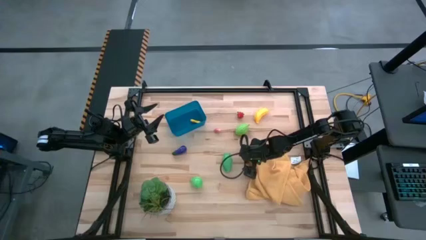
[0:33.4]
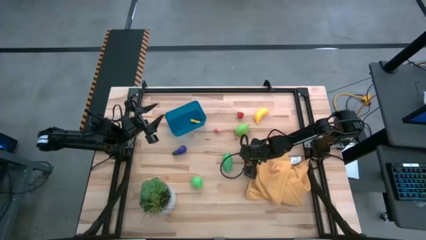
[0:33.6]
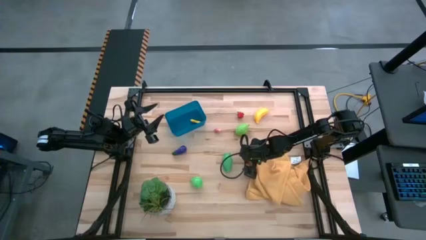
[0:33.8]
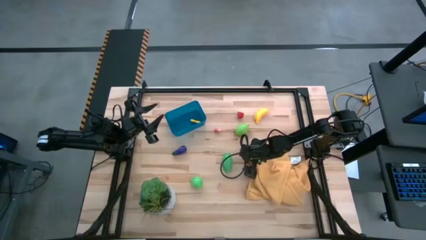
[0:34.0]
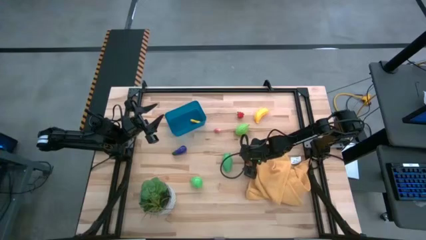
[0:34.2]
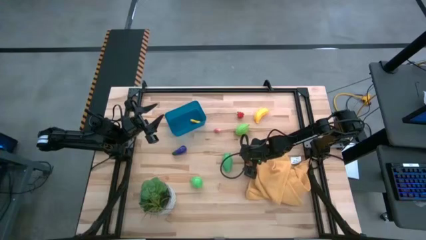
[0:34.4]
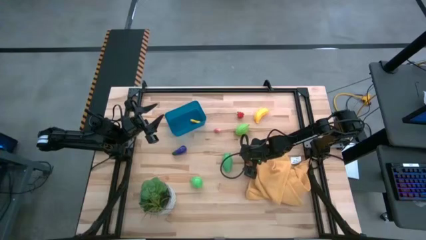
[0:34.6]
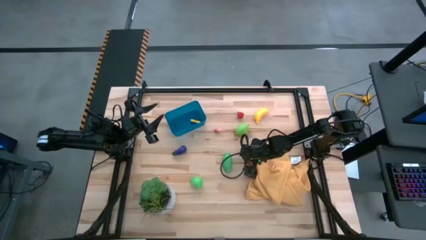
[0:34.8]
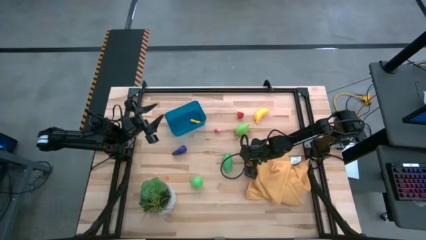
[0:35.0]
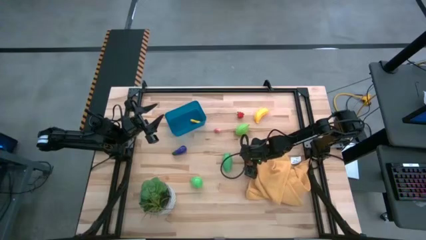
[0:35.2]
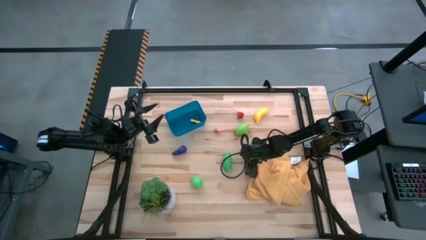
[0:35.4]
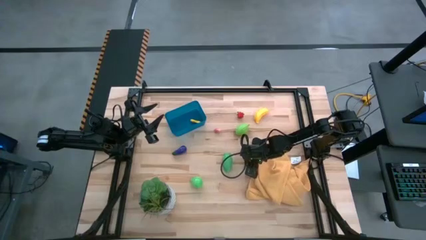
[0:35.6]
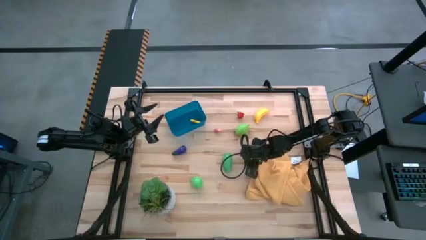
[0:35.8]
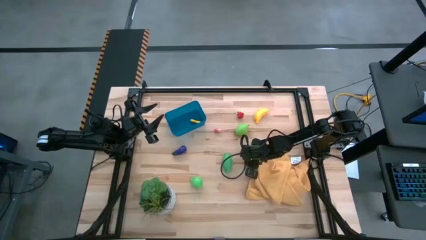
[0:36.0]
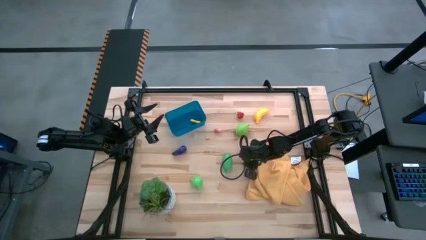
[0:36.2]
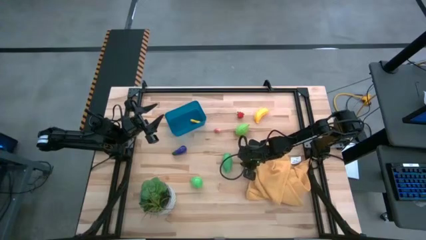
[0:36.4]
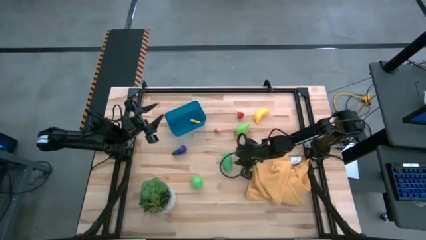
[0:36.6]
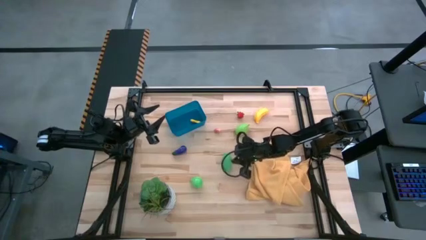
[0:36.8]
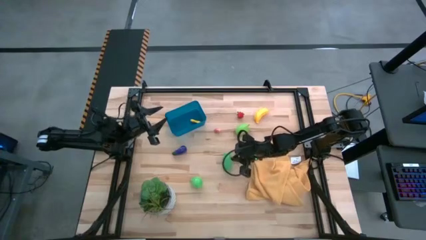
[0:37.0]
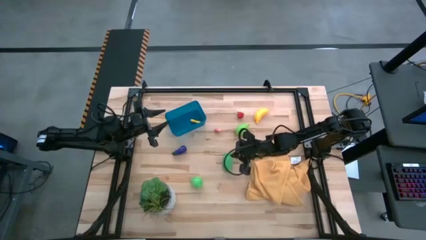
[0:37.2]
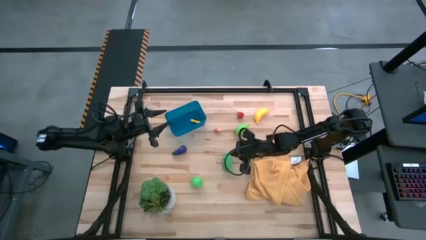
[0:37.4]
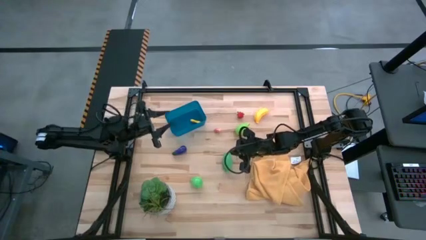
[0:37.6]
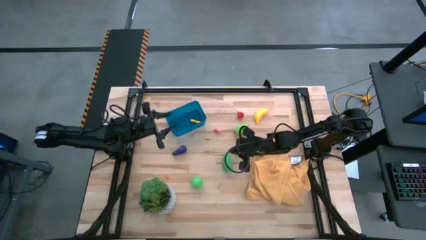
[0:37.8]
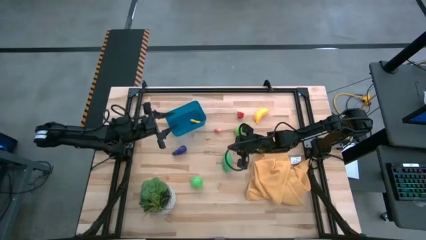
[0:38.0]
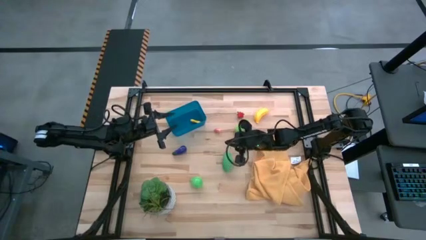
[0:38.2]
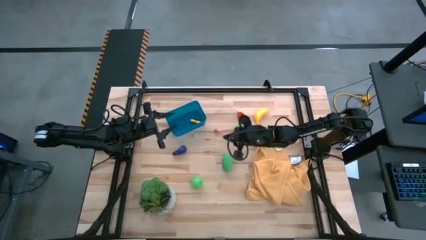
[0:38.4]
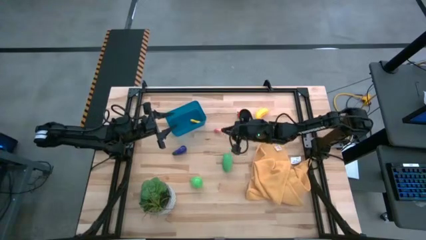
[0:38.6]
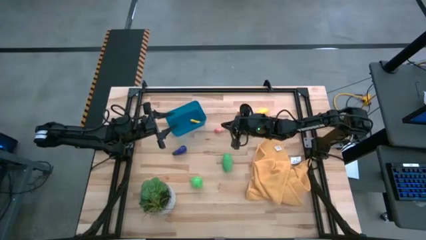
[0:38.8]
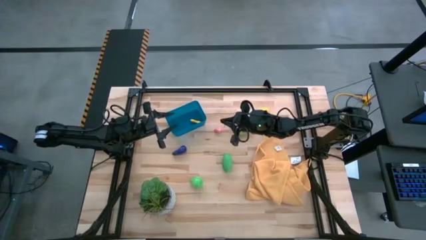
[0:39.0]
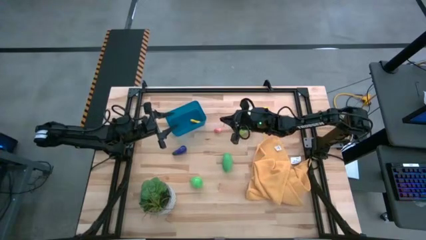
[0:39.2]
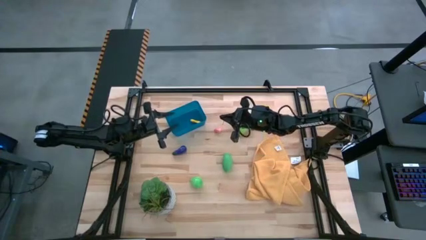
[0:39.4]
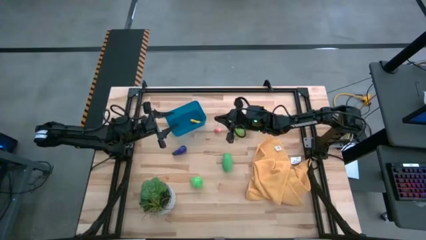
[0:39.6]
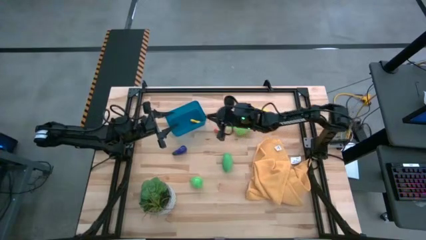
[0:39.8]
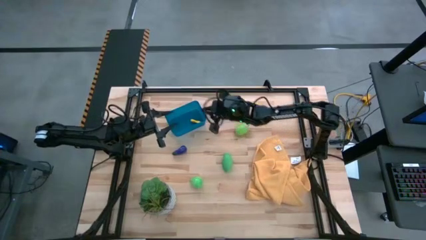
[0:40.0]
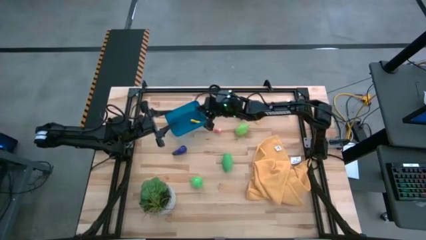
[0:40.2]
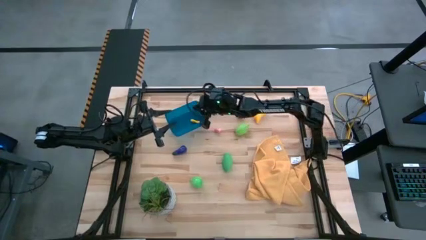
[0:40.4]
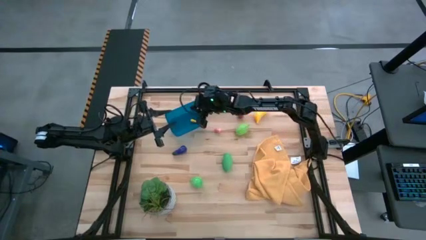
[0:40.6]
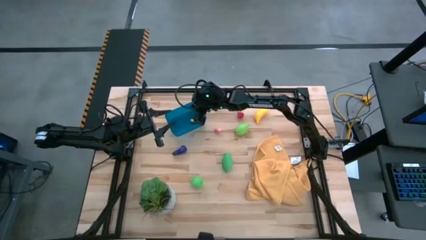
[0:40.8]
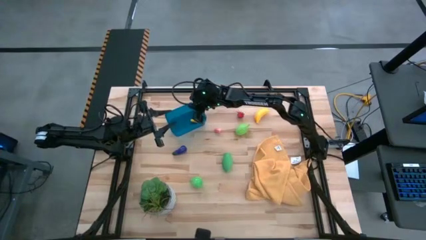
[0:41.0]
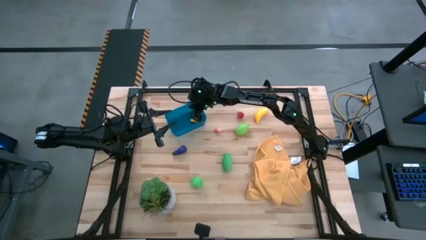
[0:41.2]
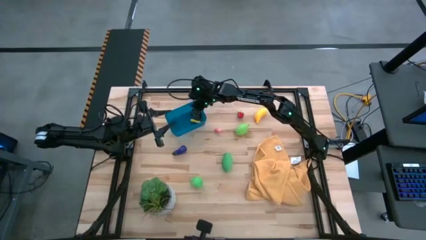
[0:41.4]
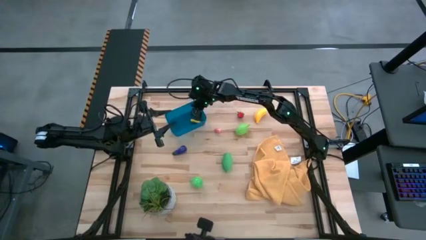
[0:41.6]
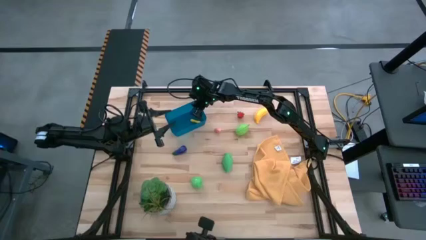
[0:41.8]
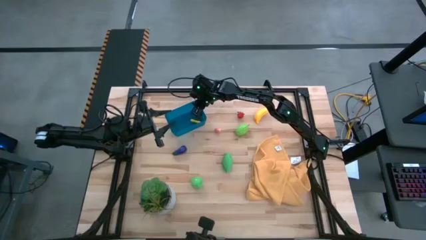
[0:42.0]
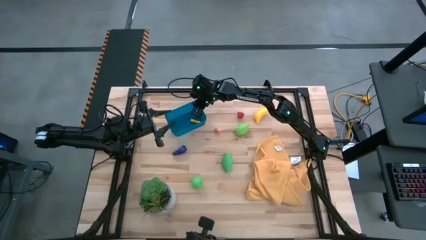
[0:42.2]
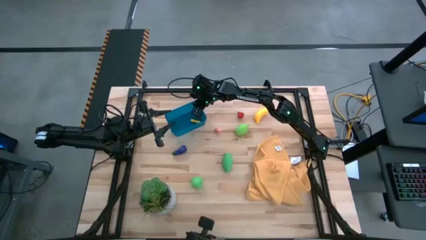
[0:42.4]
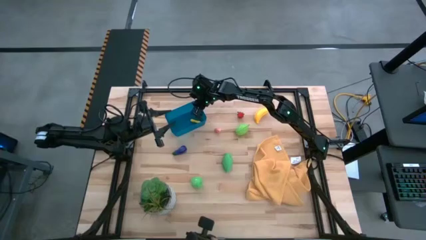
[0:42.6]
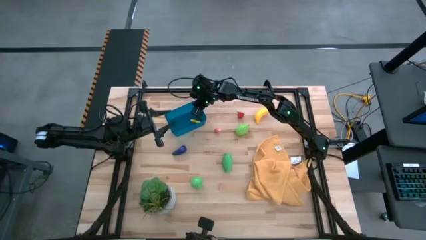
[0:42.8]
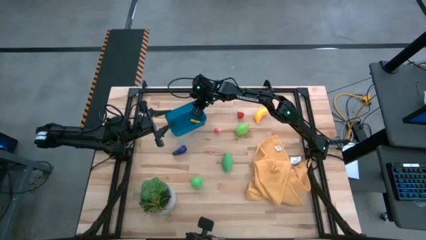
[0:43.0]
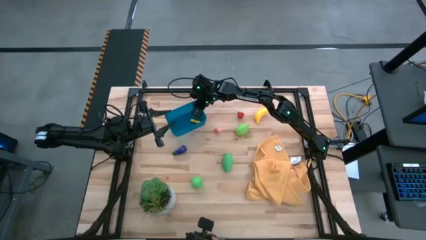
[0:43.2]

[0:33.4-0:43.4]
Task: Pick and placing Produce into tupperware
Put the cherry into the blue bin

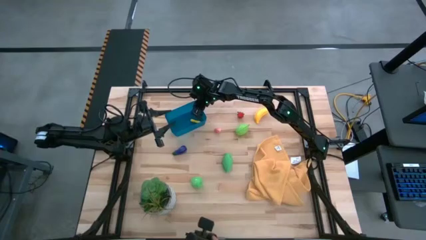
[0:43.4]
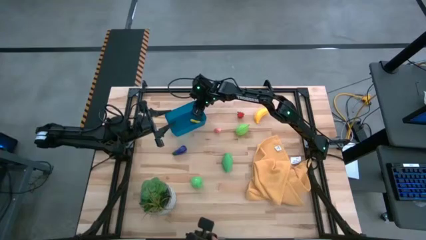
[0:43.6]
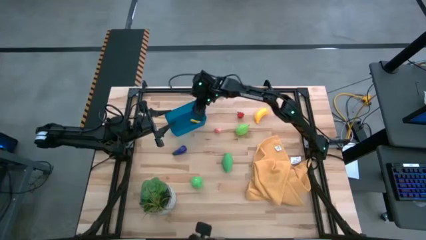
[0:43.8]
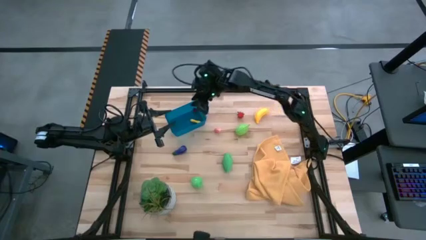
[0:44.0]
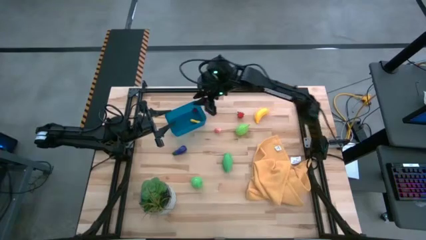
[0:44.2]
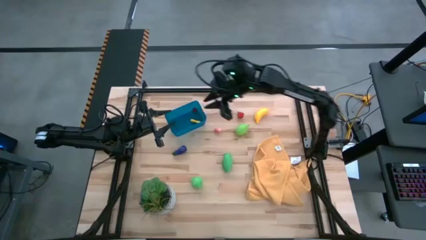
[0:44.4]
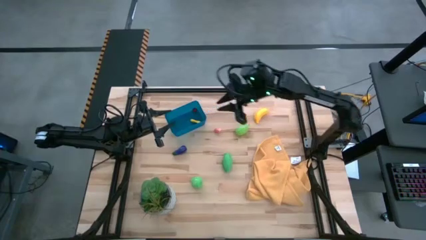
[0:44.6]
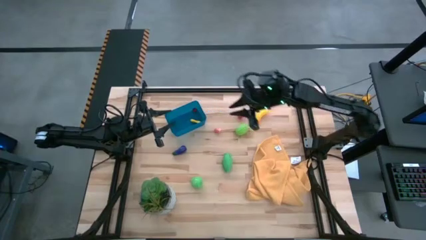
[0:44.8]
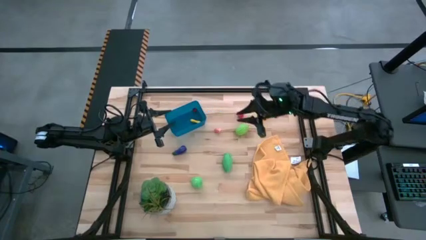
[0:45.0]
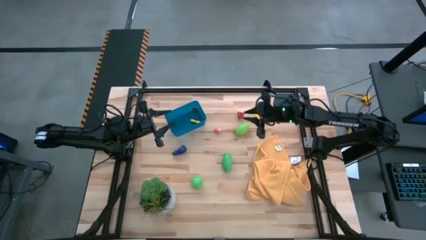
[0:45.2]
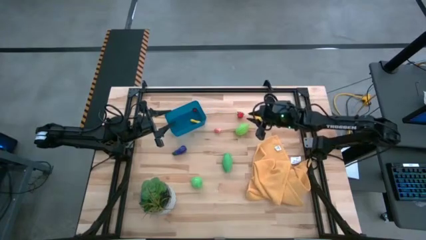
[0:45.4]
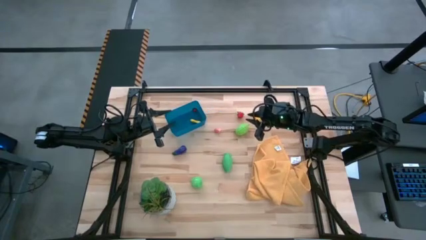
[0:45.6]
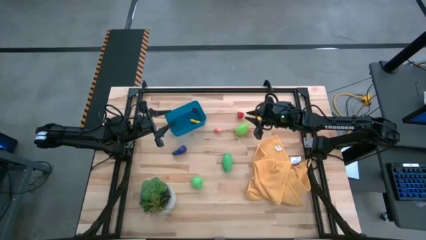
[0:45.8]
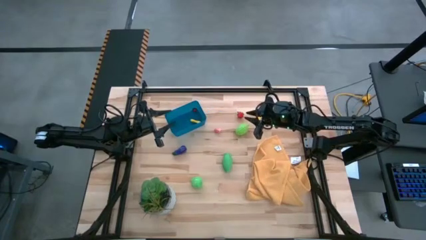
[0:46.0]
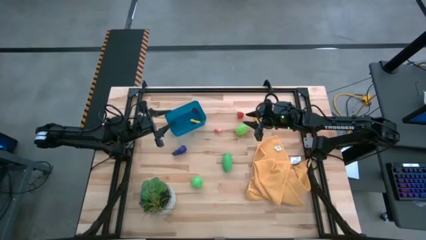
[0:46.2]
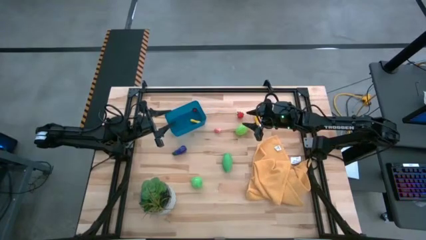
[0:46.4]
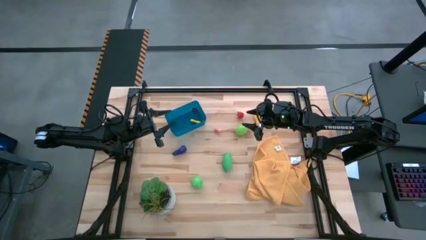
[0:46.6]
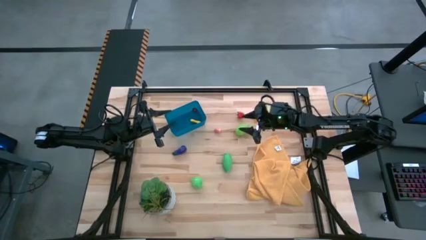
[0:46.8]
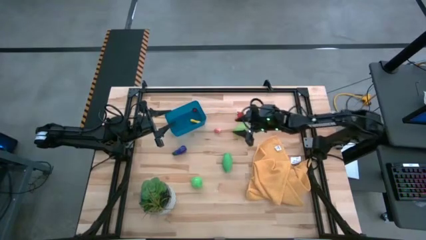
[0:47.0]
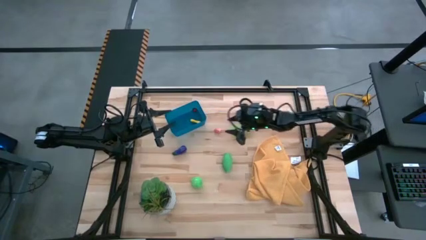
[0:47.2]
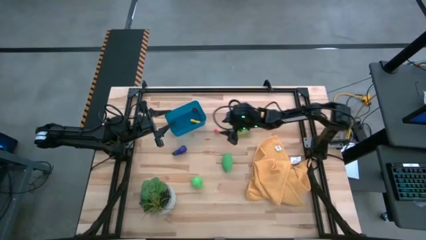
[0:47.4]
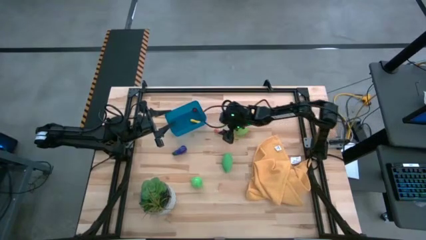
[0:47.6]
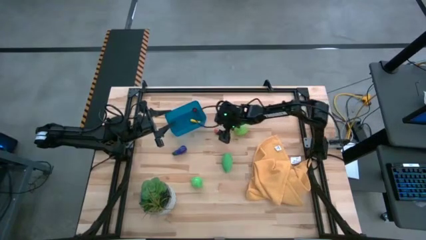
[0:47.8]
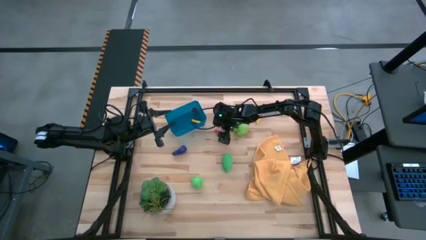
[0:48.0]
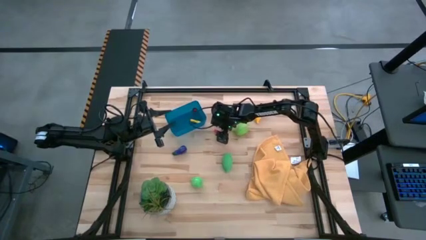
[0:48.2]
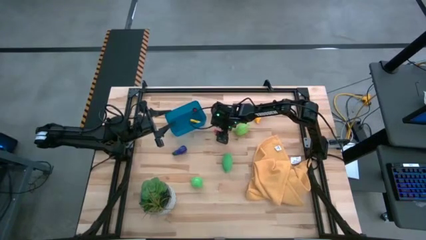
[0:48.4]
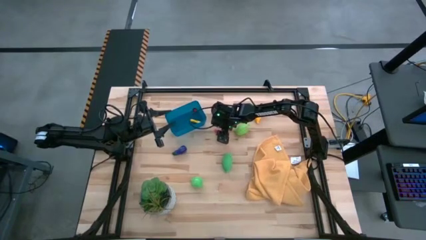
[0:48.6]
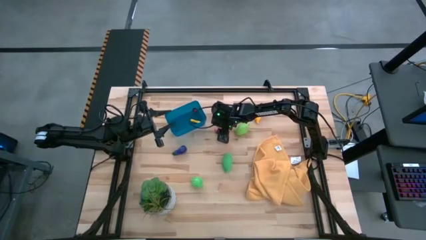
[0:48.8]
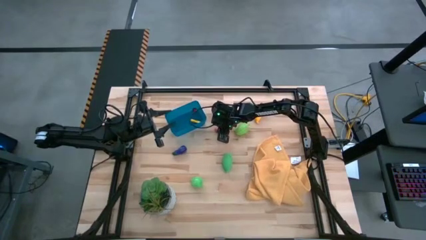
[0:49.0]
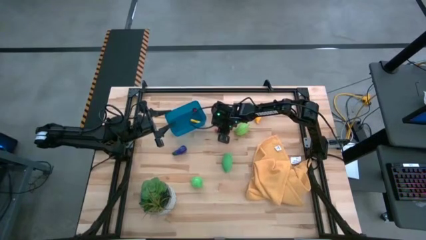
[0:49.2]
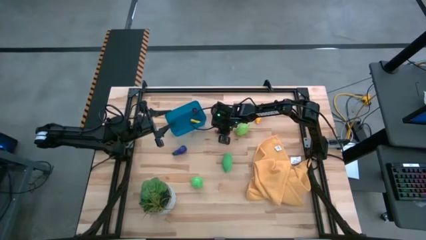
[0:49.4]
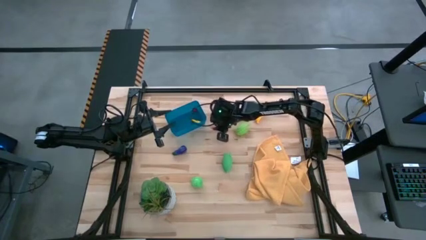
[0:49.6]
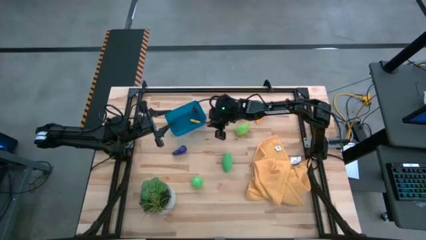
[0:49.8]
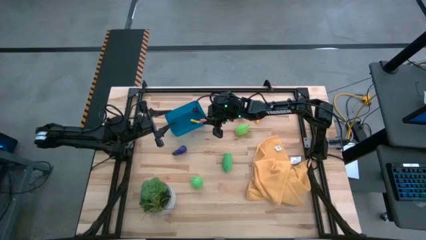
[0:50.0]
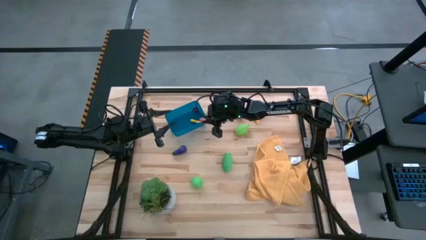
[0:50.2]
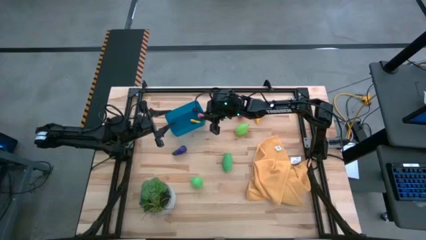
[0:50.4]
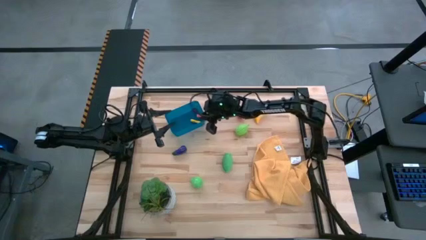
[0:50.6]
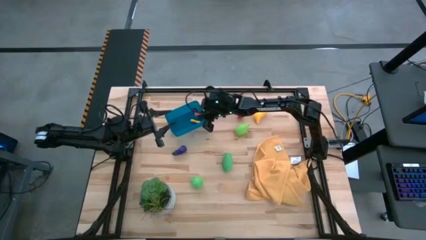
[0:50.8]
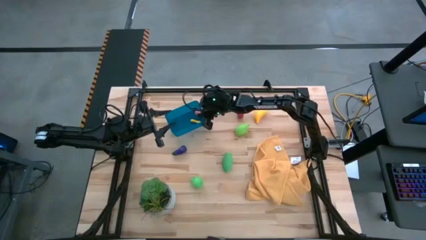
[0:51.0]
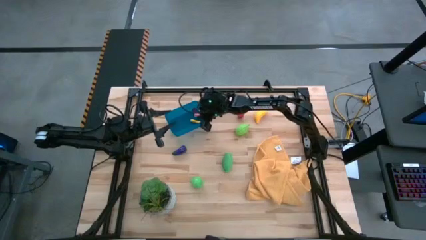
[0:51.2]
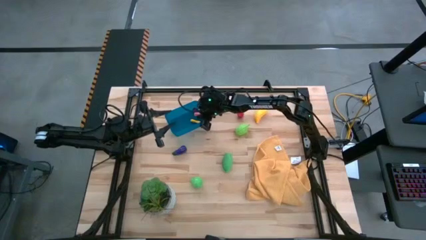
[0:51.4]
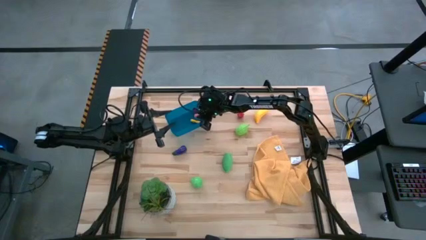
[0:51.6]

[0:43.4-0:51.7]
Put the peach into the blue bin
